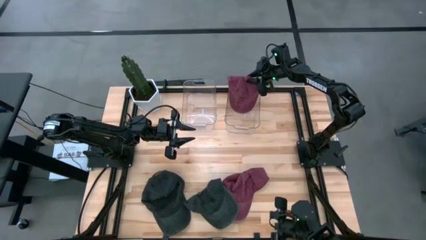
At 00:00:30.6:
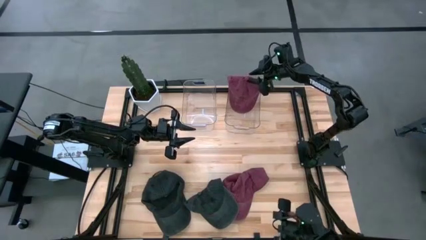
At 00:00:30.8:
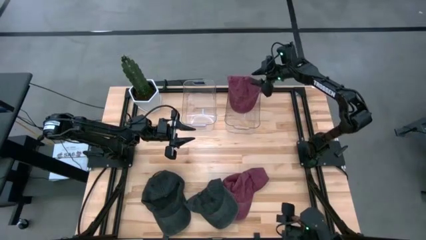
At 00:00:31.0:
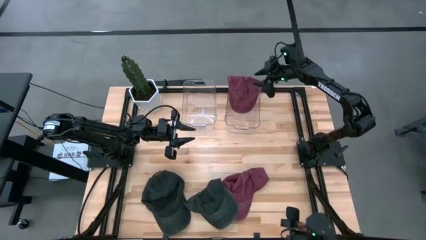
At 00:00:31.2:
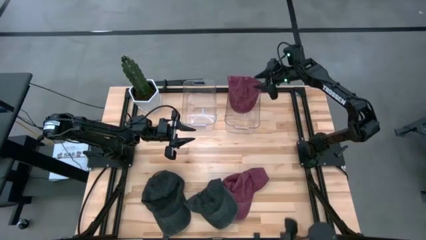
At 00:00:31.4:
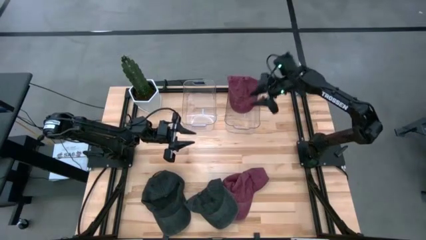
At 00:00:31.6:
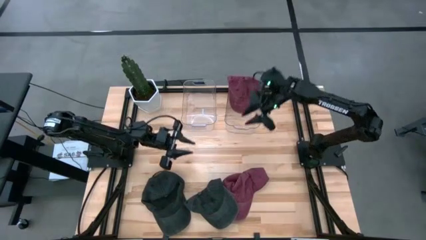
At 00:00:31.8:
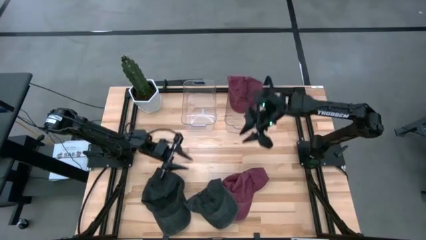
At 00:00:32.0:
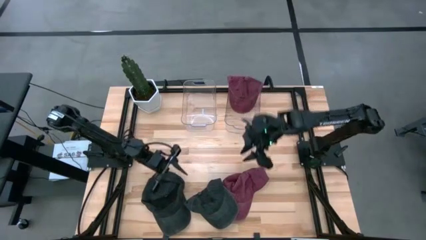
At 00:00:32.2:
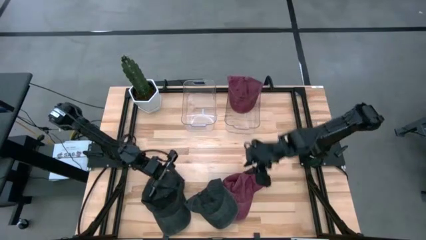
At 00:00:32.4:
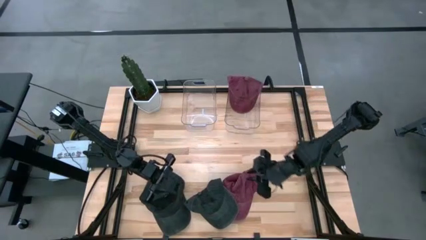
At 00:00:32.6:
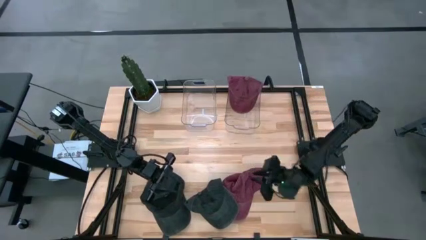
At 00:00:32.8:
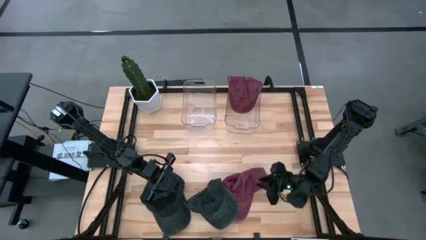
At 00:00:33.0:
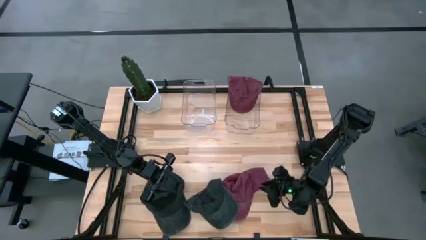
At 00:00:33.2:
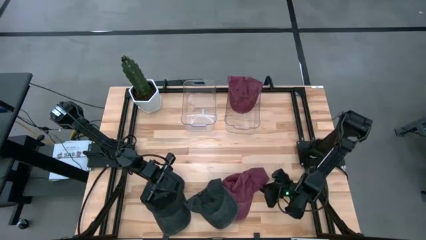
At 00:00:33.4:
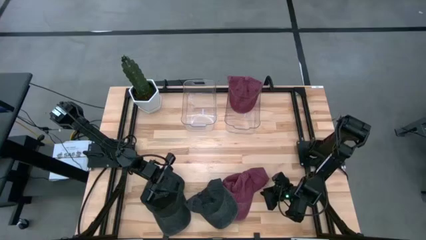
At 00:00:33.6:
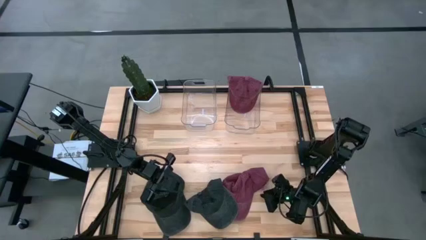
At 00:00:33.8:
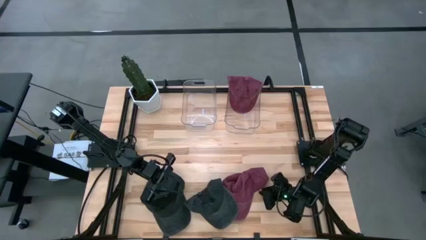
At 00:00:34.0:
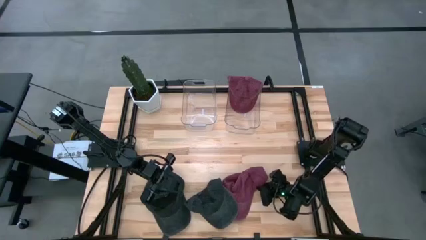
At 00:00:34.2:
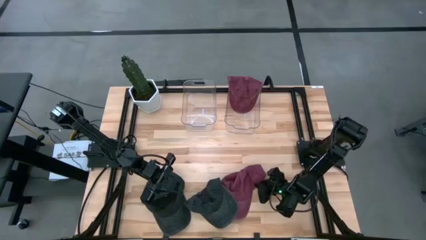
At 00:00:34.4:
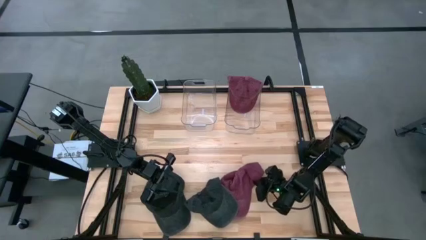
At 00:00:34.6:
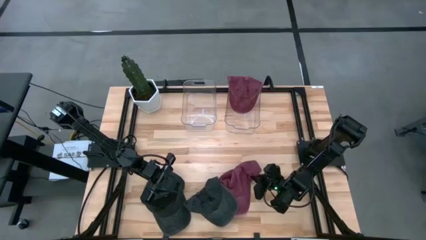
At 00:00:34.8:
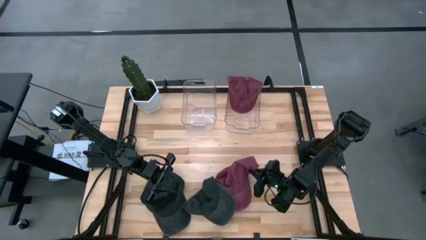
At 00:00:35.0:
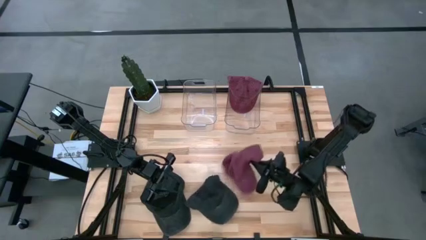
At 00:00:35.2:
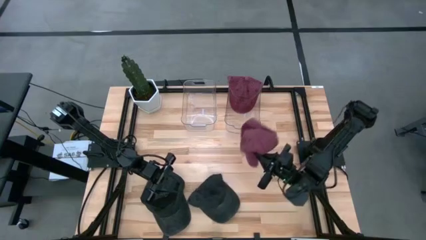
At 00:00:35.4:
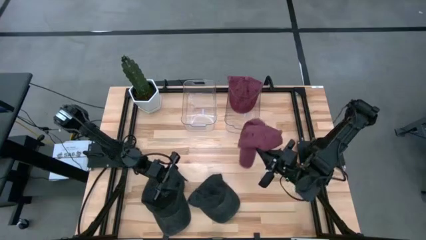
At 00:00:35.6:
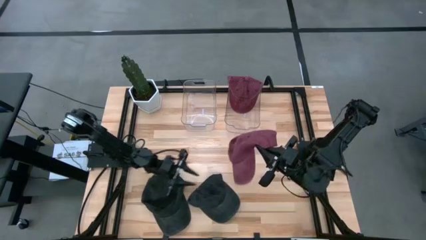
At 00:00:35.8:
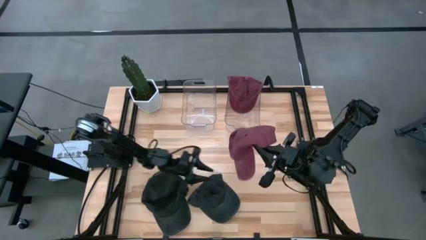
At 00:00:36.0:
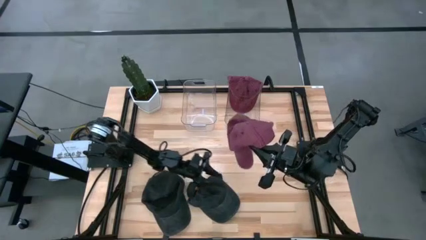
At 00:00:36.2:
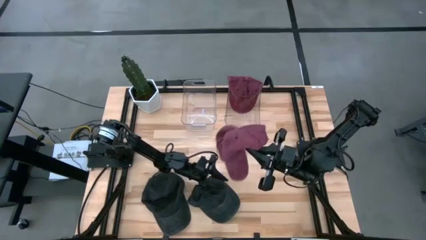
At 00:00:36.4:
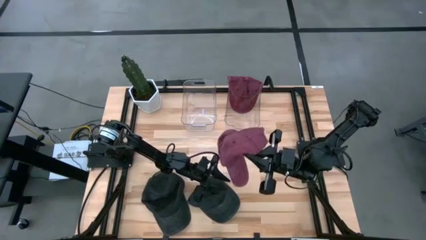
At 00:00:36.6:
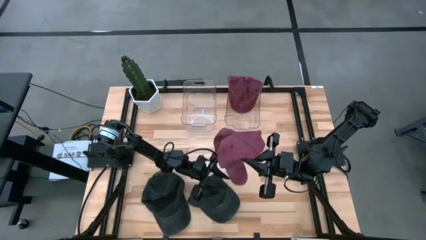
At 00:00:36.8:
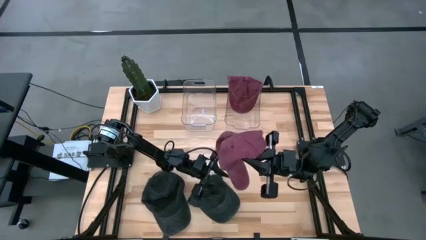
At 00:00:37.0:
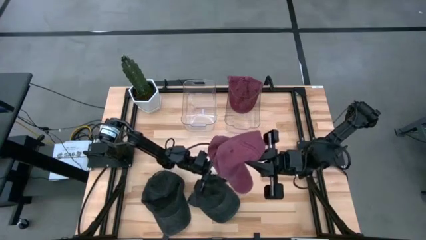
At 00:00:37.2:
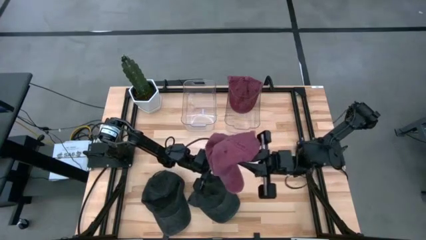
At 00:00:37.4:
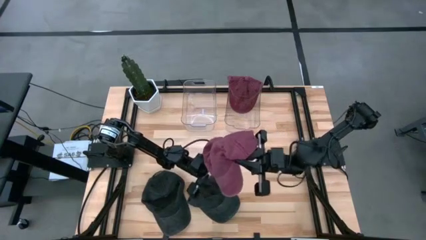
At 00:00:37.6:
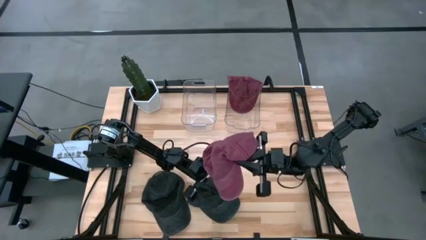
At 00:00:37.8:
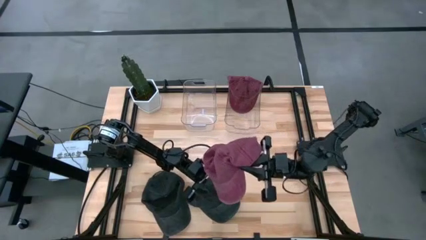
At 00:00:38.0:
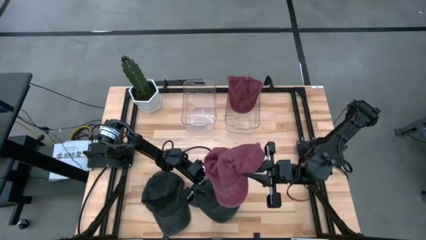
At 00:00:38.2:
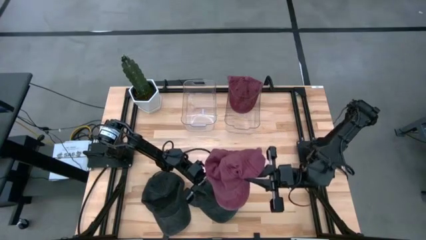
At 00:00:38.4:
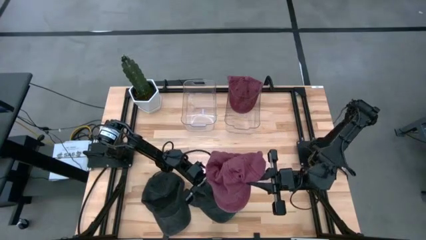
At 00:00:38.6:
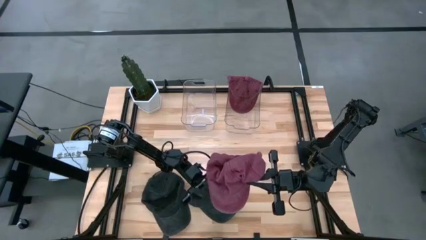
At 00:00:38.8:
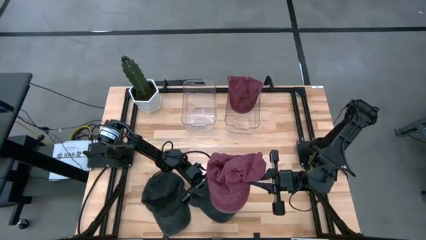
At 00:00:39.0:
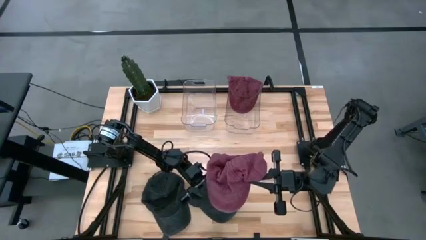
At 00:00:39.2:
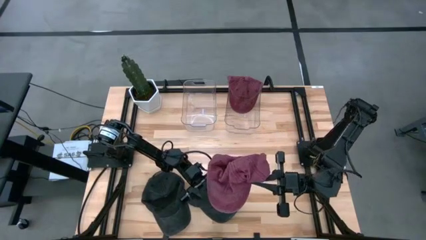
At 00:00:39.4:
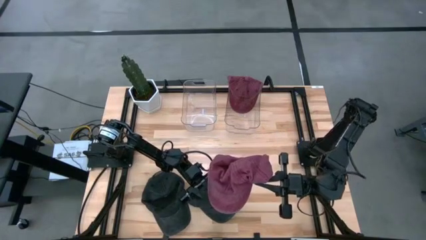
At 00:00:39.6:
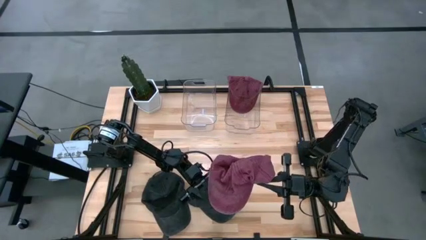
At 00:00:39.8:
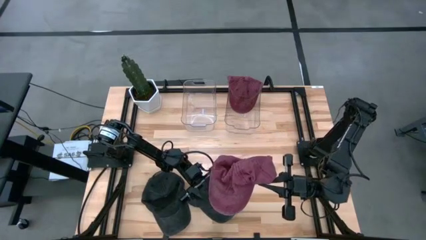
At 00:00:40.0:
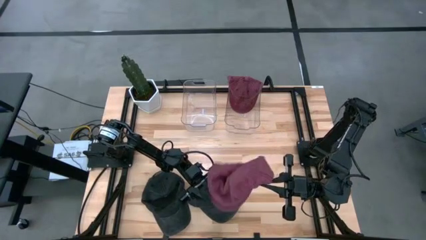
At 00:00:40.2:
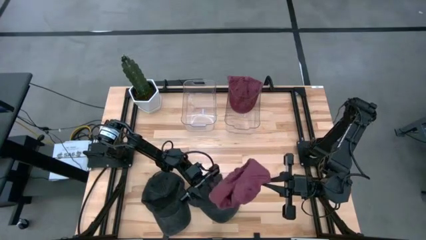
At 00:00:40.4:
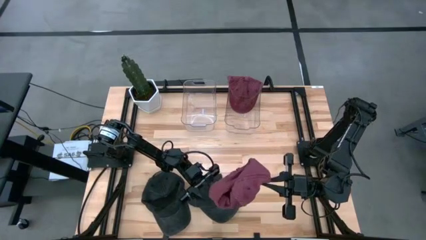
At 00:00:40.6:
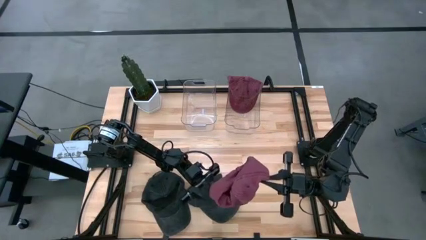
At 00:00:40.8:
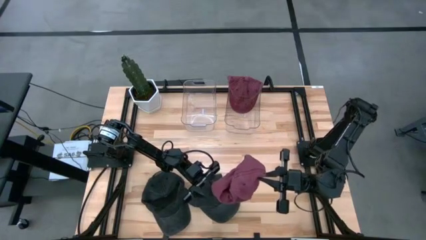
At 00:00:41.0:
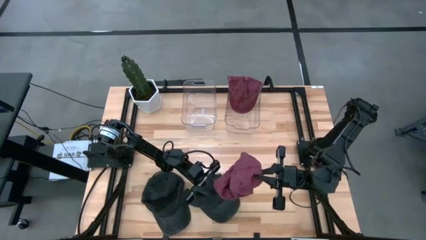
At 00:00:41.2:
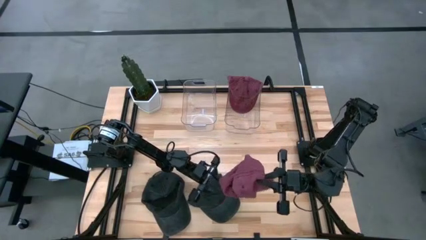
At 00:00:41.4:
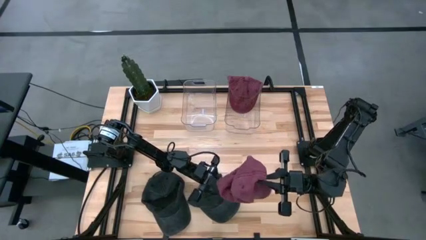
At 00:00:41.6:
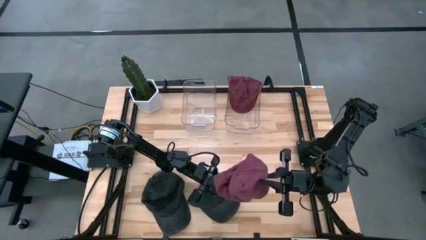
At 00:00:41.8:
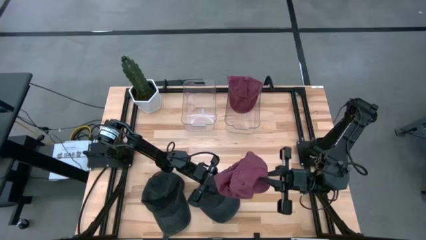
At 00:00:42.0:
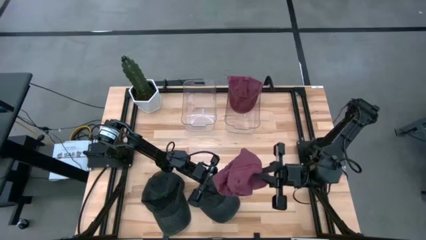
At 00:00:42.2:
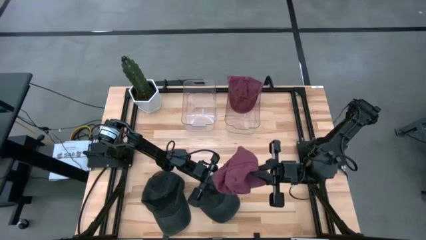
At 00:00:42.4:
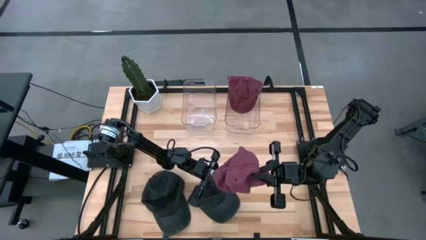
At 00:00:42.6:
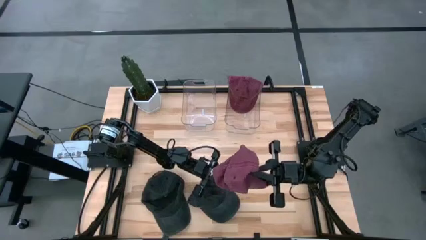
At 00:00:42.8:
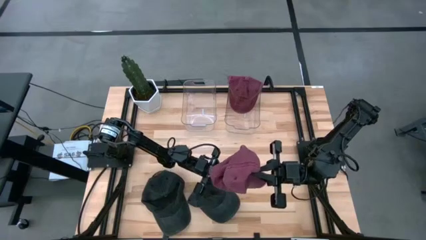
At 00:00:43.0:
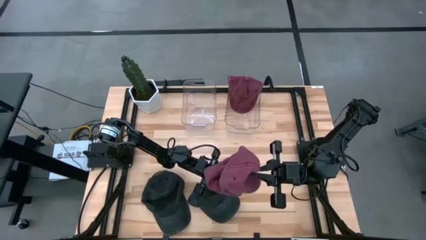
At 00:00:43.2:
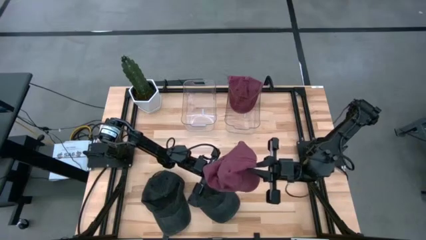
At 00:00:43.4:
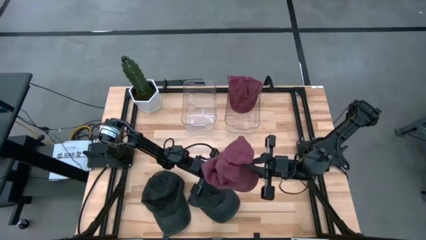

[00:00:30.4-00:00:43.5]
Task: Pick & Place hat
Put the maroon head cap into the right transparent bin
